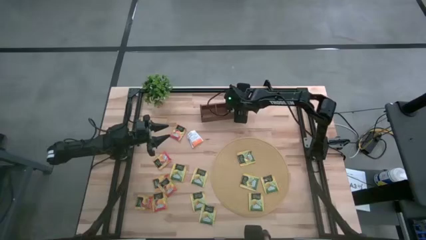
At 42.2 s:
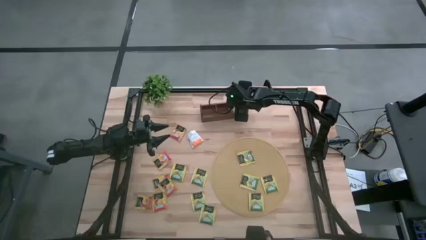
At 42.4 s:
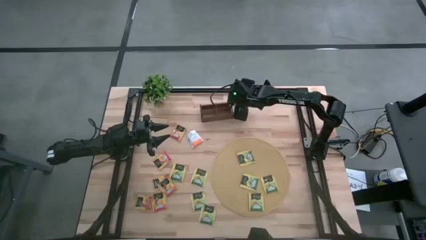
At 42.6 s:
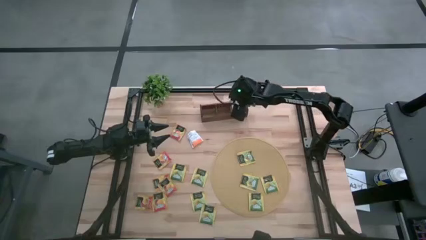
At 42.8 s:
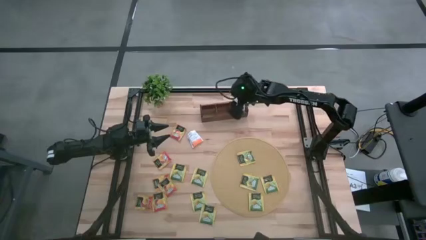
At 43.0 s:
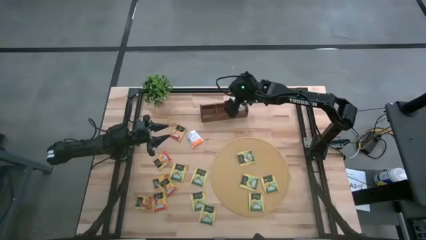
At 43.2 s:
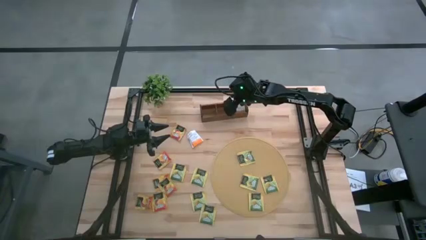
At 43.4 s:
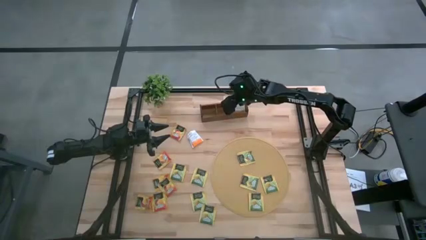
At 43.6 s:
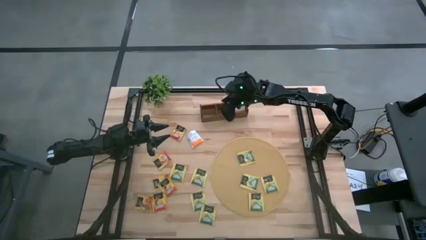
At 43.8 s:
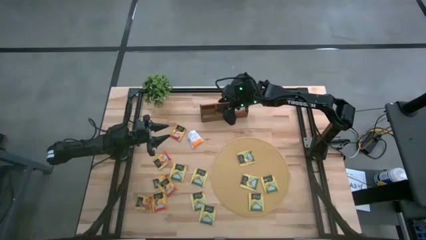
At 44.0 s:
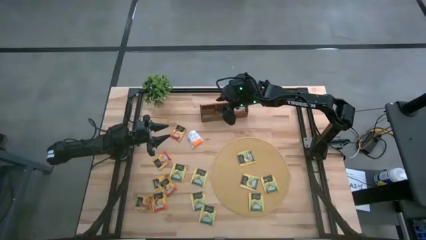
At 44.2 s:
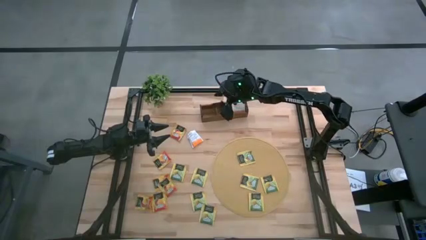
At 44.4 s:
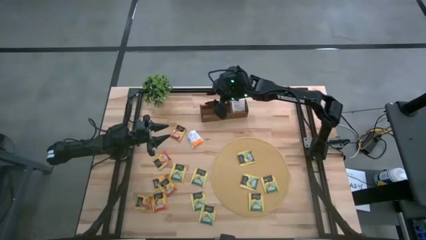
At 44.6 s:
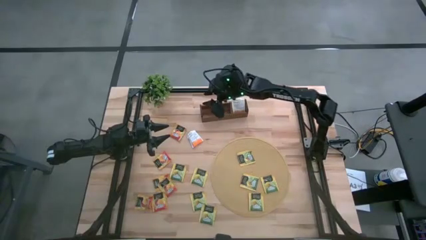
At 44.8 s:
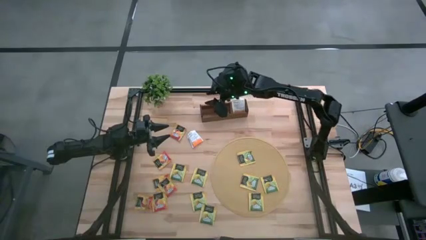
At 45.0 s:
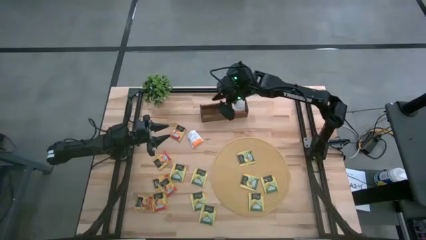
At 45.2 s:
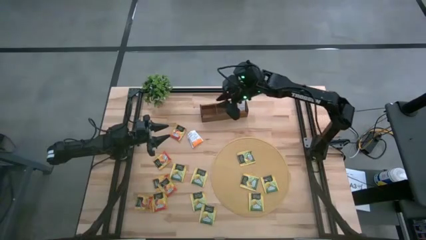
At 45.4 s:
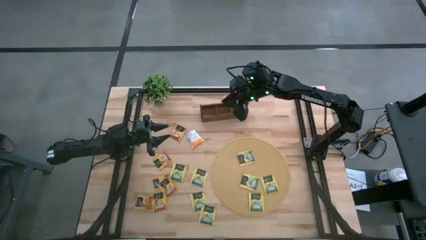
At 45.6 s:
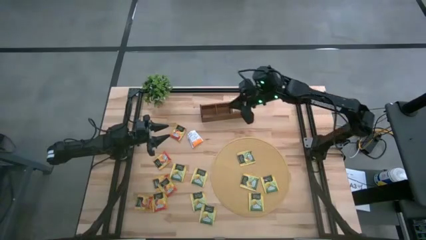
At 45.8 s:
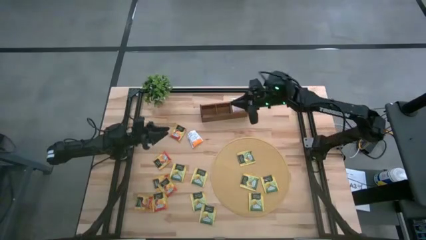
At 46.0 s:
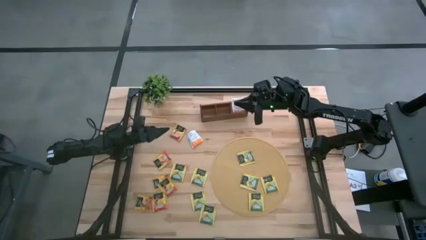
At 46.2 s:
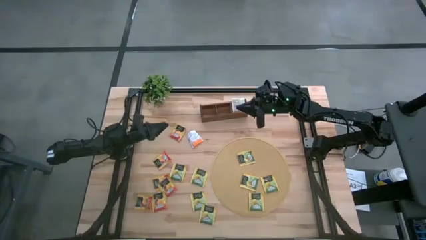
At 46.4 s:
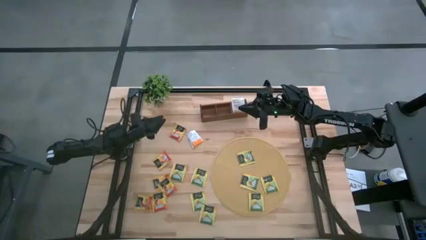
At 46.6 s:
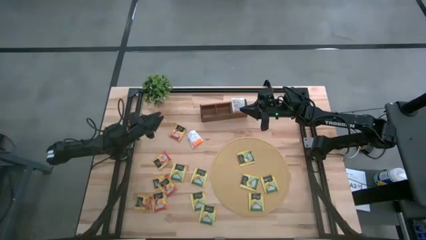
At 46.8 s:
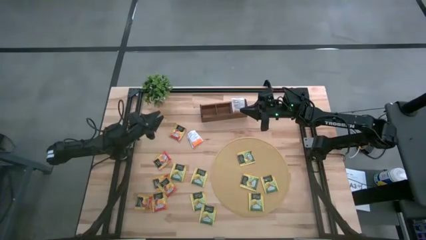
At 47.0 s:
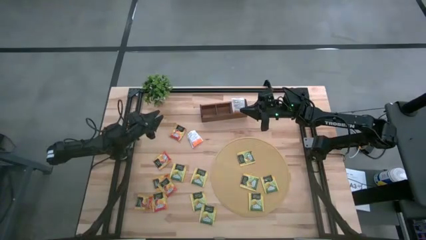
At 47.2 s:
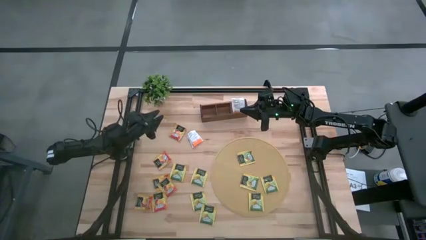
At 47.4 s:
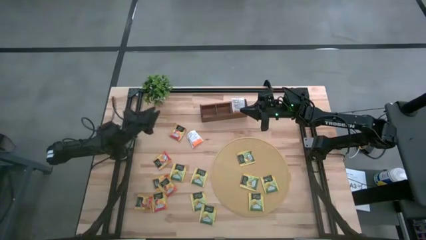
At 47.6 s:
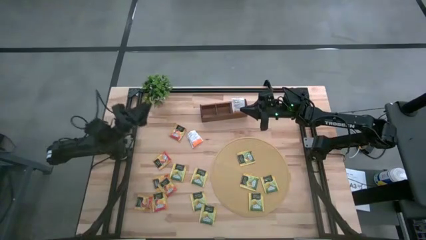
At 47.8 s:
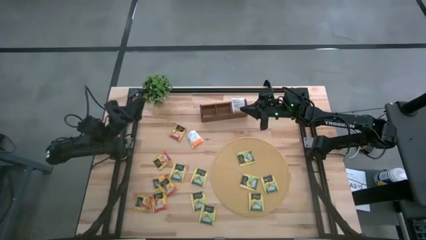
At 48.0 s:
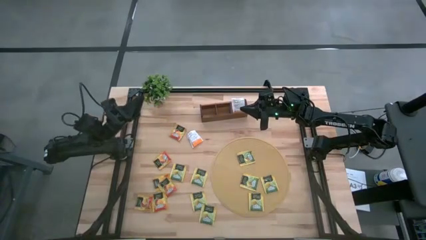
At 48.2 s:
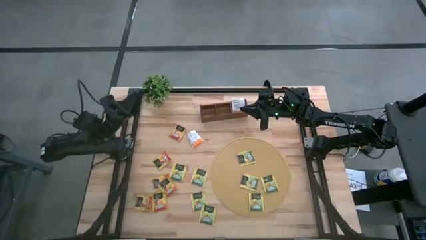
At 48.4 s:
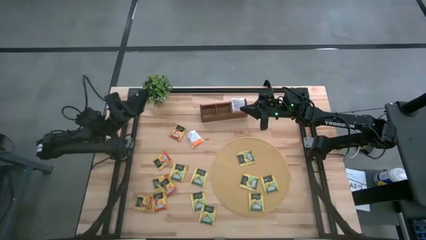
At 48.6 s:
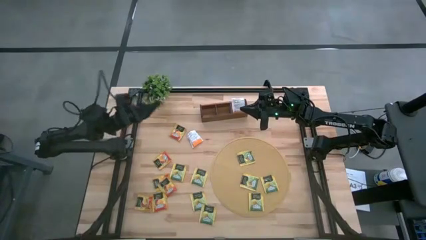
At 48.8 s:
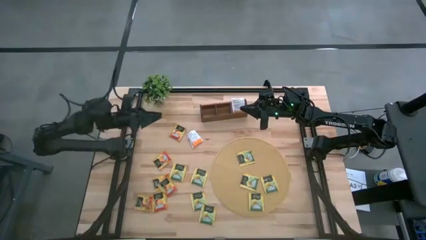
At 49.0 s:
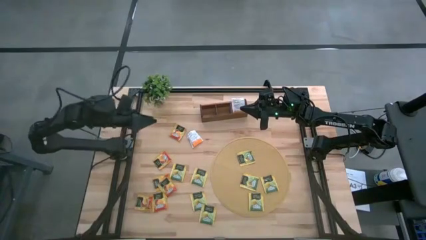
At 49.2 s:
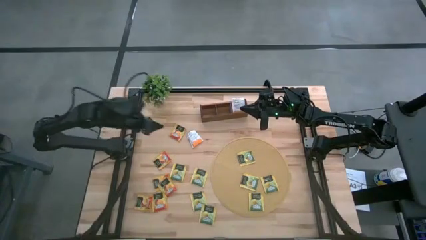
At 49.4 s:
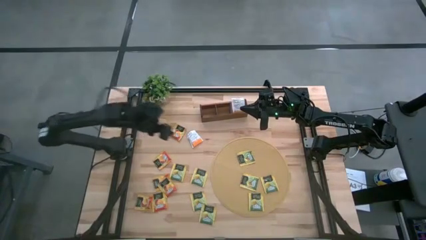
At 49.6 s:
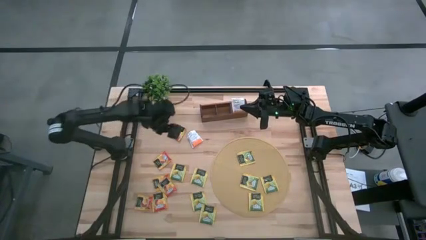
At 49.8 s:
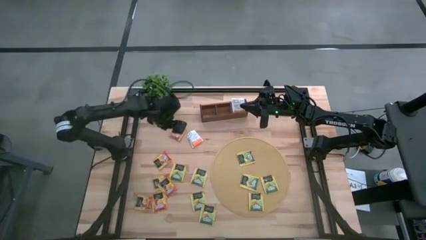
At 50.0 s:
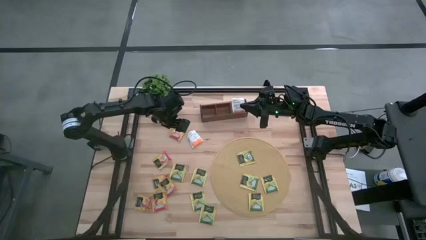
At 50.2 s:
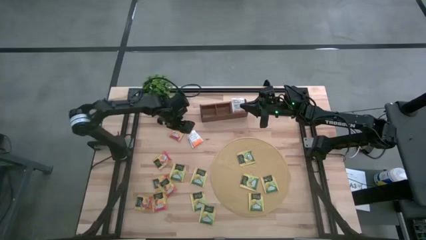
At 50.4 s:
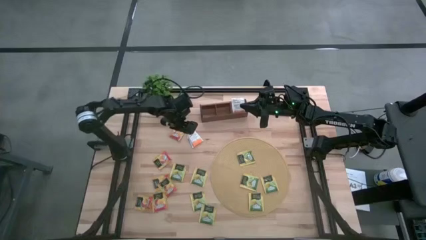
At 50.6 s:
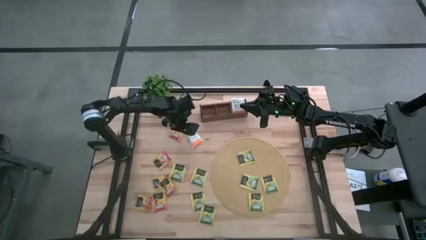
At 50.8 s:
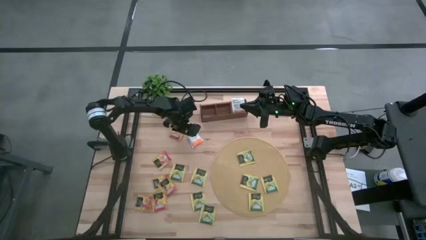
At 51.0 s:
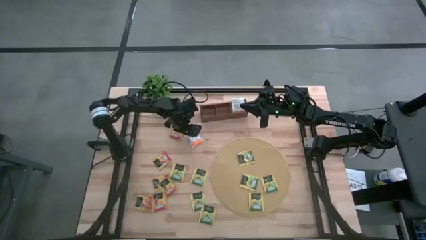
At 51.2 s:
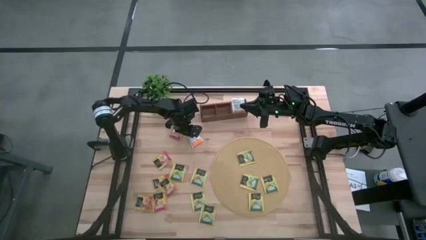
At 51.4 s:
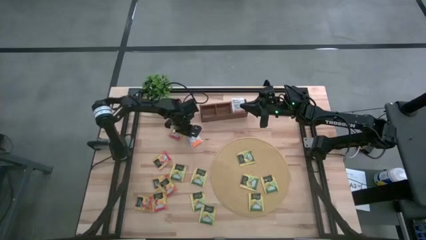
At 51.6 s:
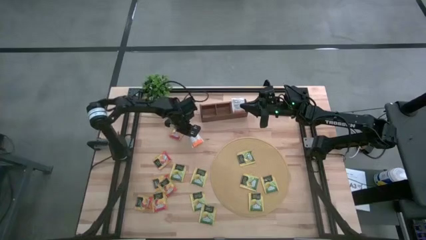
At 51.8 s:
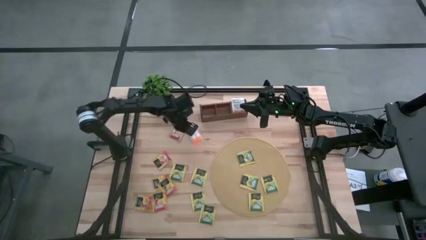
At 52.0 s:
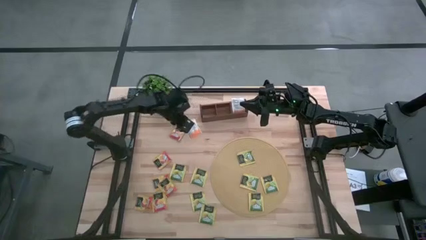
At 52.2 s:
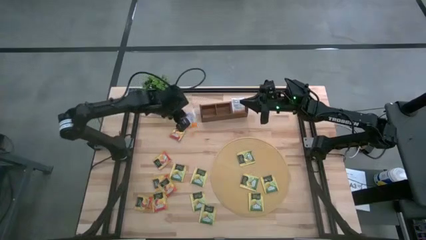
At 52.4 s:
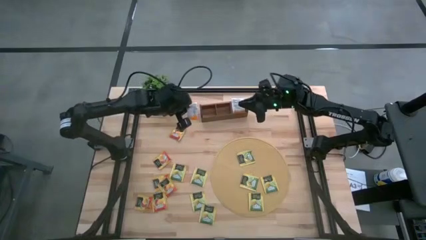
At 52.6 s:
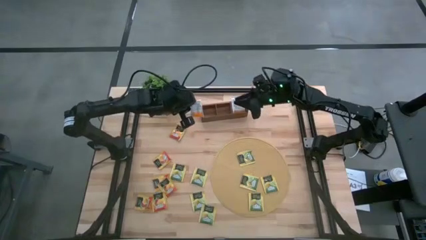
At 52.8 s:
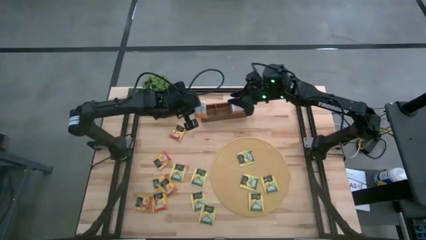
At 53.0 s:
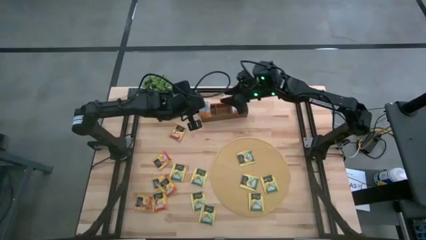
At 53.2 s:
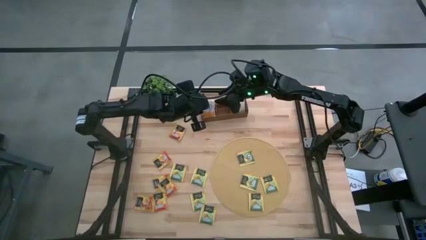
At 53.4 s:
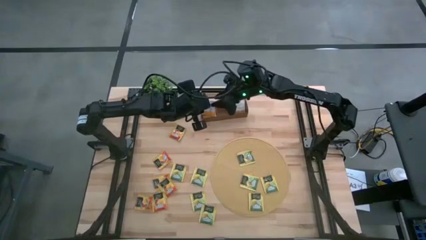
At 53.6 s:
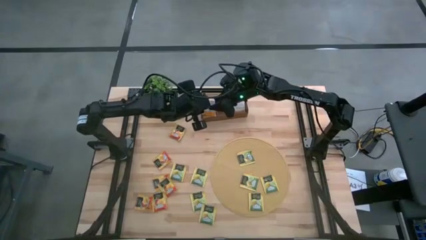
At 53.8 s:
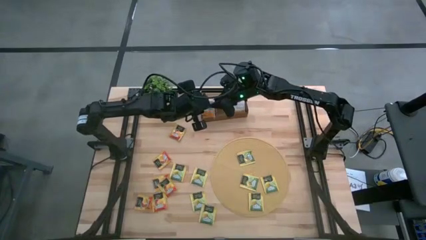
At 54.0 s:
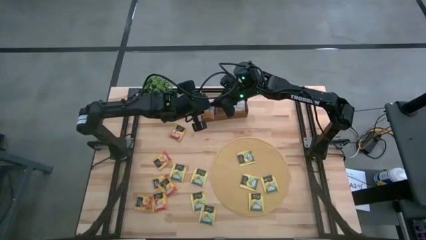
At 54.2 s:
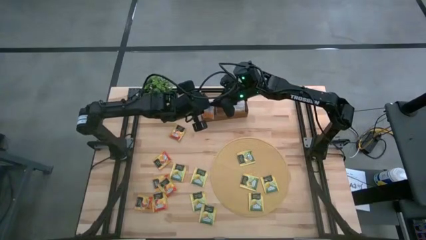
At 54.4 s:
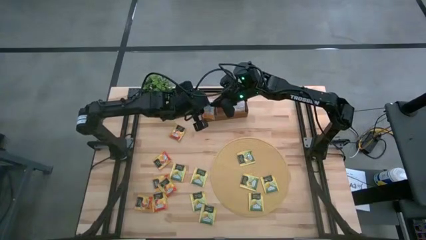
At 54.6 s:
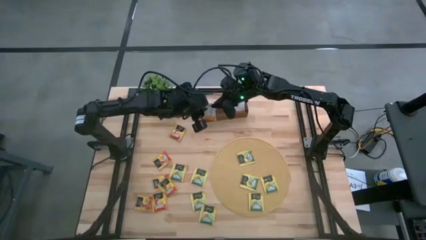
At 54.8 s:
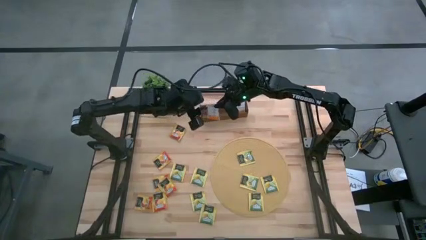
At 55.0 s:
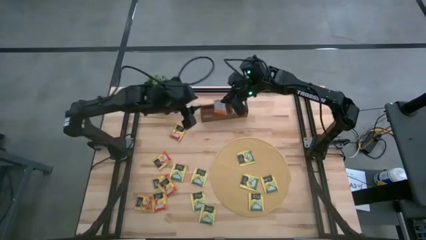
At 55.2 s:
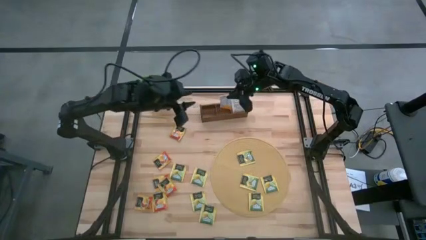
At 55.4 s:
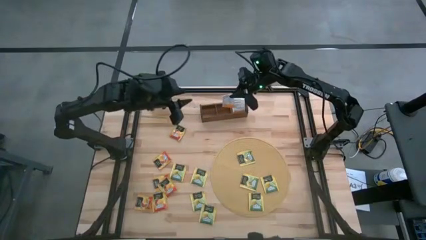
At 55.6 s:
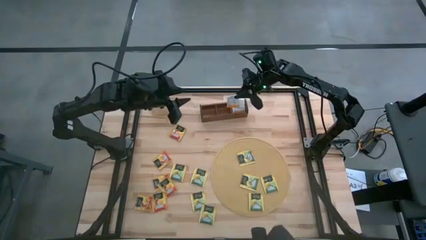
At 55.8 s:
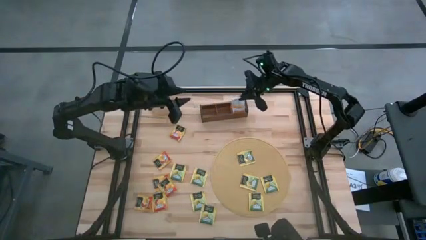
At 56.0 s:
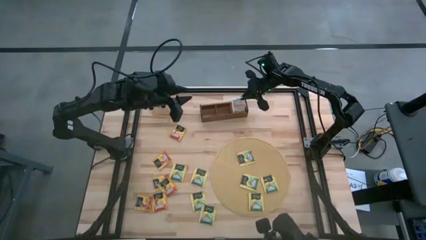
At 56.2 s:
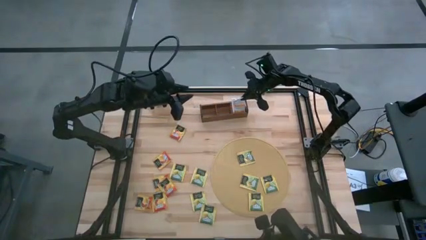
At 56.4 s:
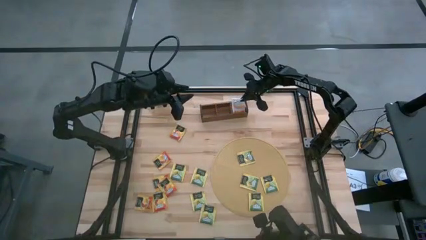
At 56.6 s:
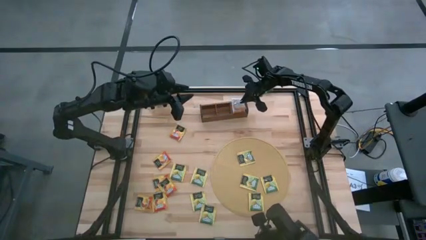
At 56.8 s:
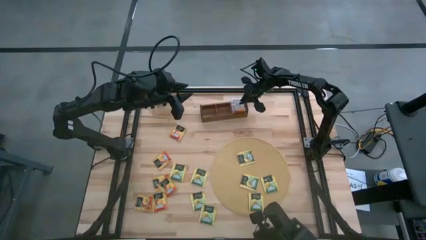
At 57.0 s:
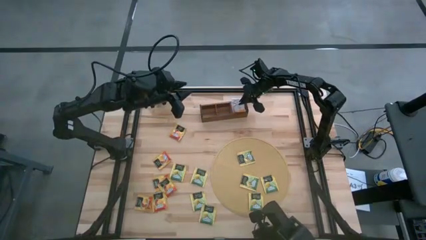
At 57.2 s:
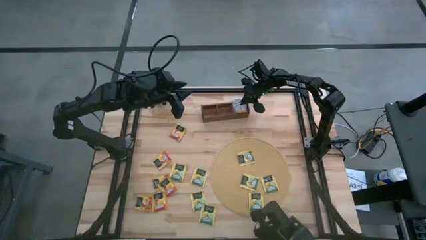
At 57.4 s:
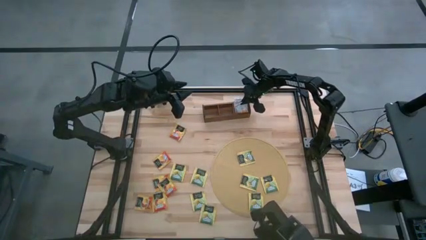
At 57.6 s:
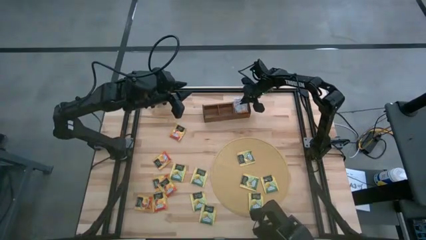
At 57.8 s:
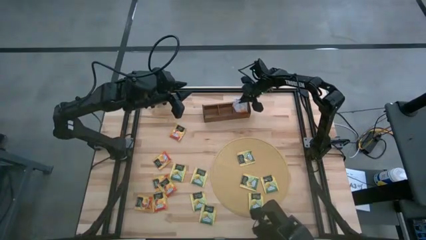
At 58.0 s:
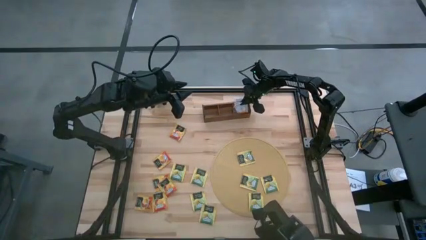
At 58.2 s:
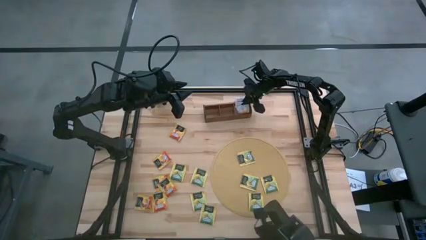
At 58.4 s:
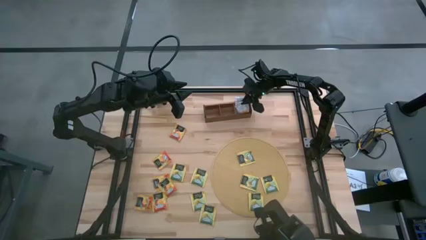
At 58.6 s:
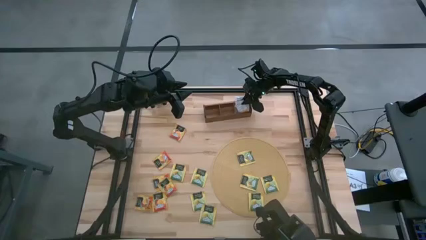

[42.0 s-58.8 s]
Task: Pick & Place Tea
Put the white tea bag into the right section of the wooden organizer
